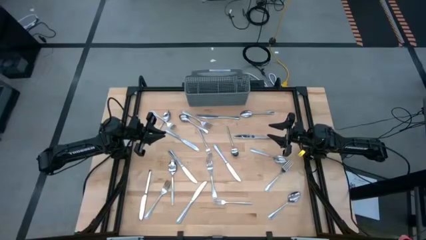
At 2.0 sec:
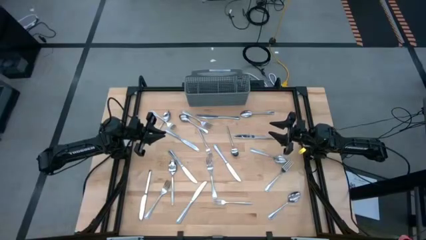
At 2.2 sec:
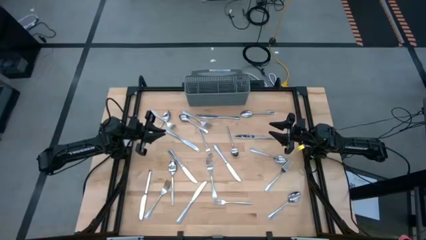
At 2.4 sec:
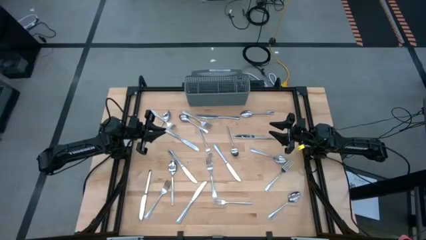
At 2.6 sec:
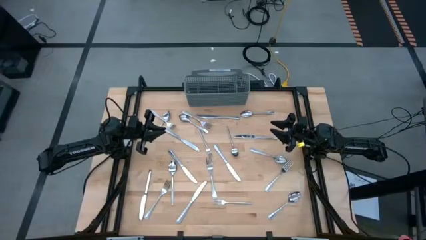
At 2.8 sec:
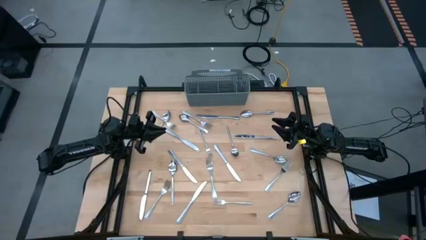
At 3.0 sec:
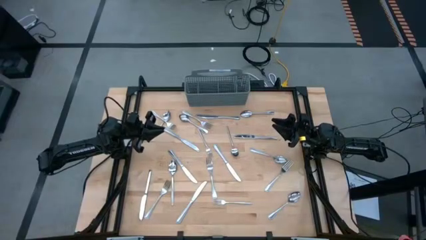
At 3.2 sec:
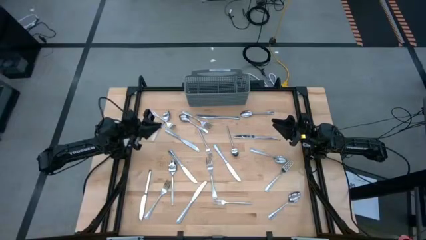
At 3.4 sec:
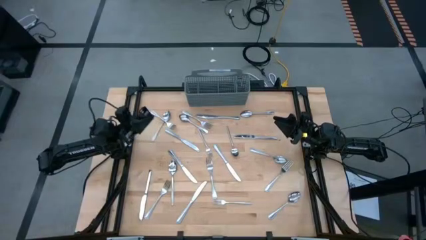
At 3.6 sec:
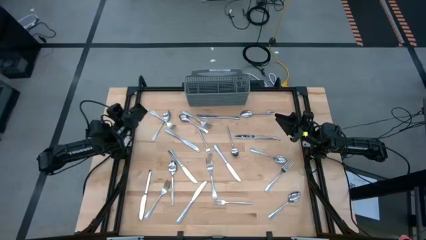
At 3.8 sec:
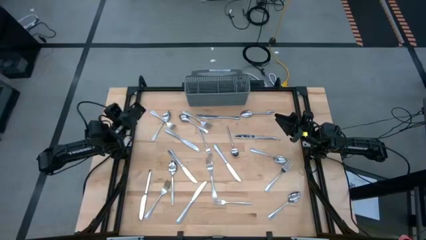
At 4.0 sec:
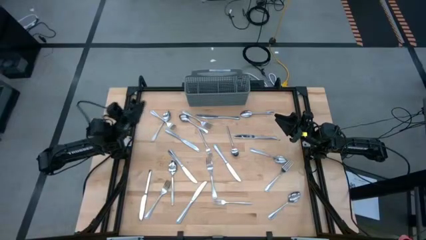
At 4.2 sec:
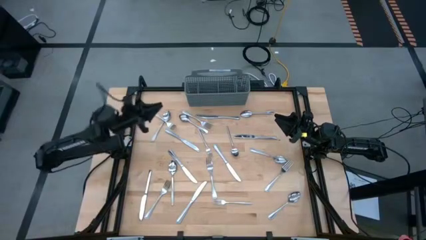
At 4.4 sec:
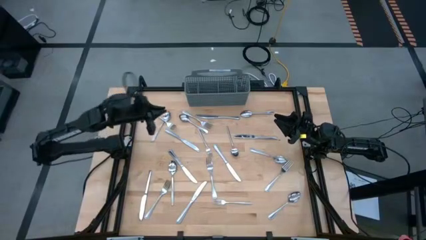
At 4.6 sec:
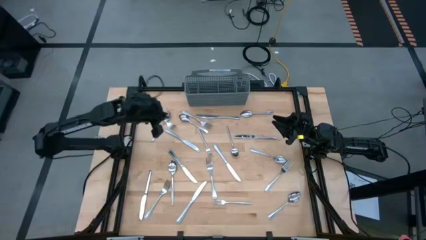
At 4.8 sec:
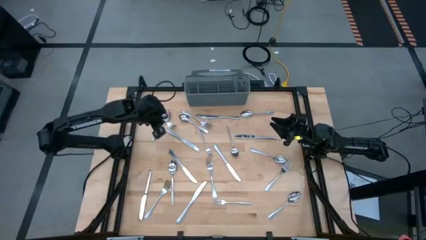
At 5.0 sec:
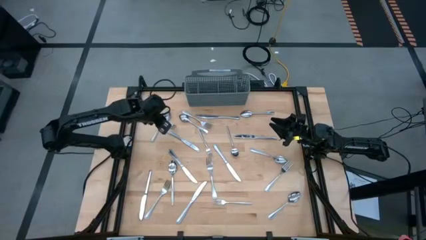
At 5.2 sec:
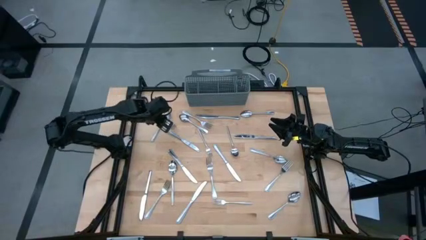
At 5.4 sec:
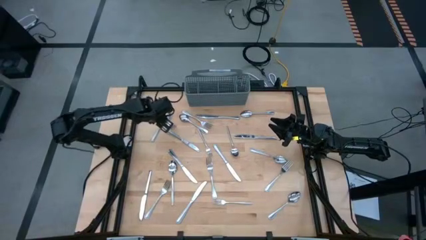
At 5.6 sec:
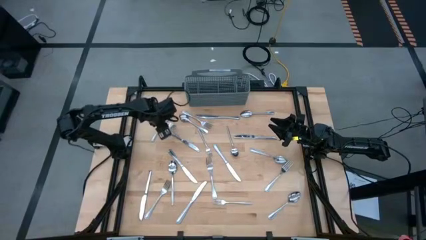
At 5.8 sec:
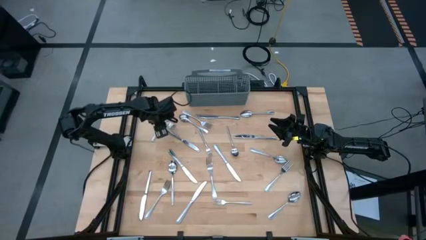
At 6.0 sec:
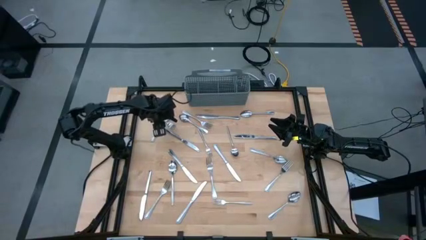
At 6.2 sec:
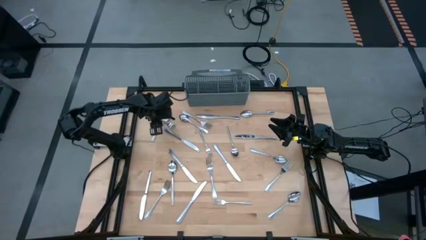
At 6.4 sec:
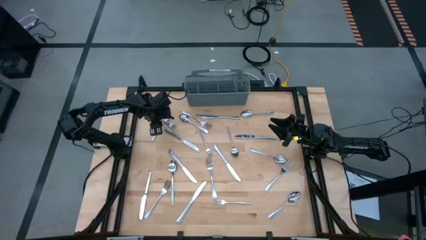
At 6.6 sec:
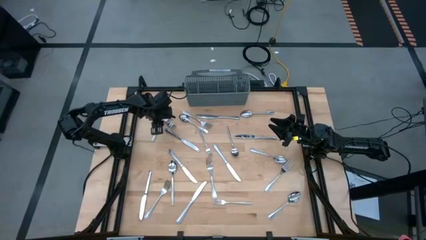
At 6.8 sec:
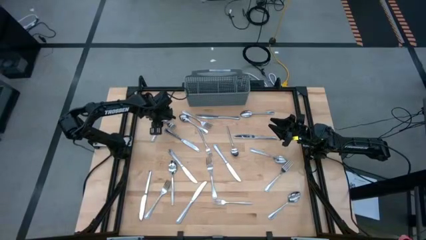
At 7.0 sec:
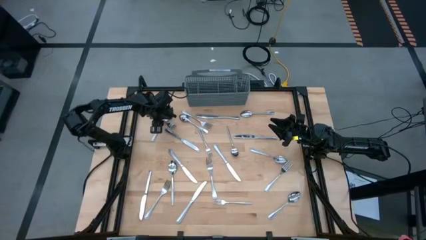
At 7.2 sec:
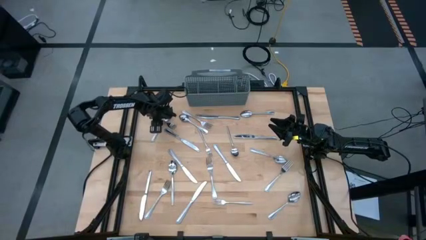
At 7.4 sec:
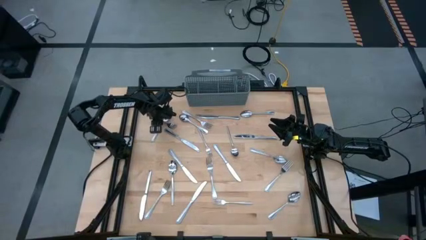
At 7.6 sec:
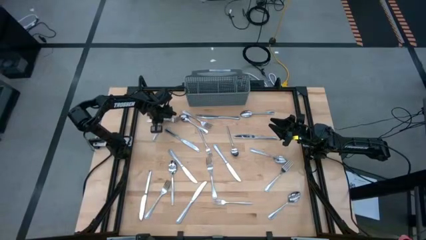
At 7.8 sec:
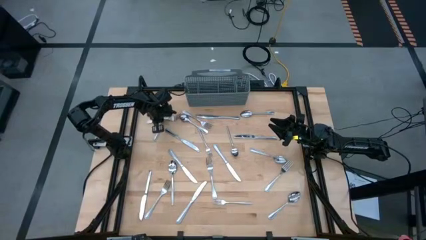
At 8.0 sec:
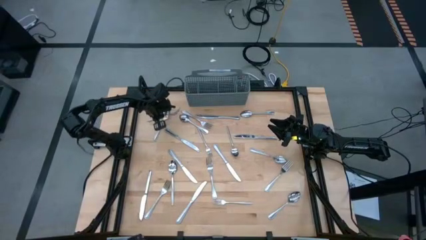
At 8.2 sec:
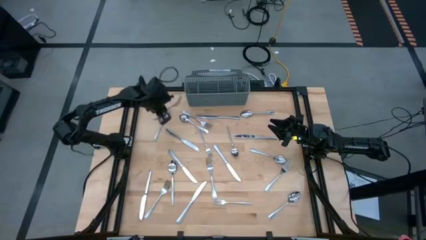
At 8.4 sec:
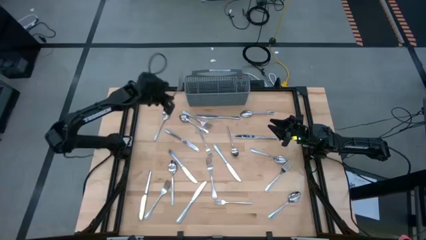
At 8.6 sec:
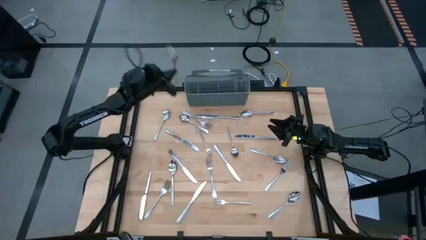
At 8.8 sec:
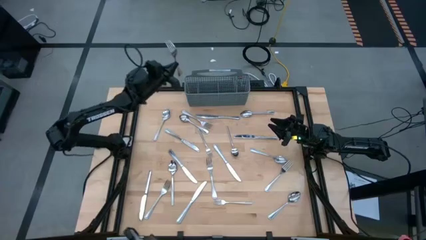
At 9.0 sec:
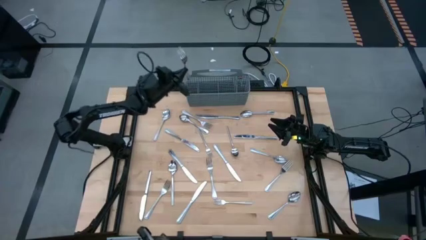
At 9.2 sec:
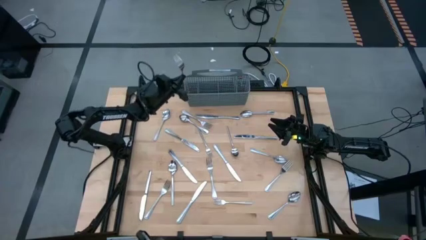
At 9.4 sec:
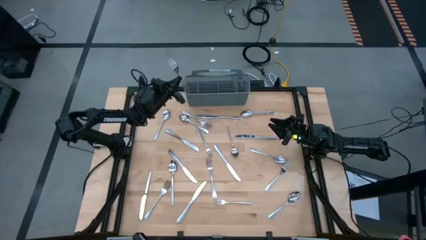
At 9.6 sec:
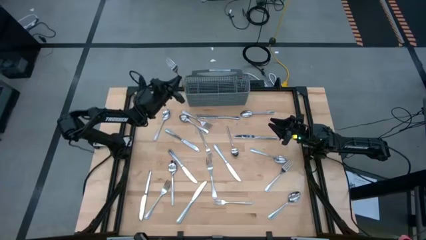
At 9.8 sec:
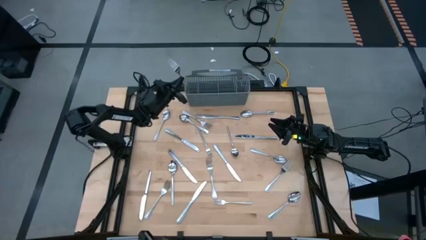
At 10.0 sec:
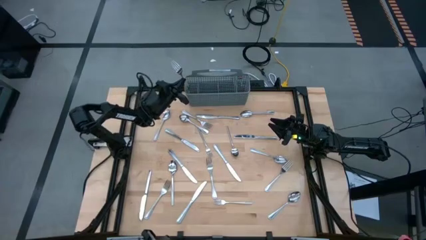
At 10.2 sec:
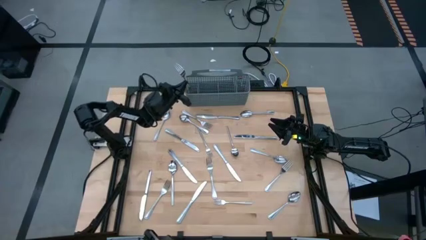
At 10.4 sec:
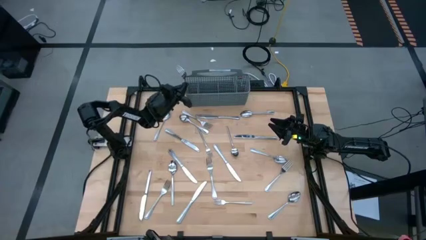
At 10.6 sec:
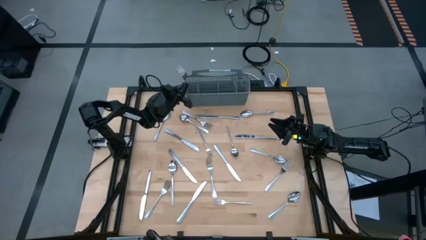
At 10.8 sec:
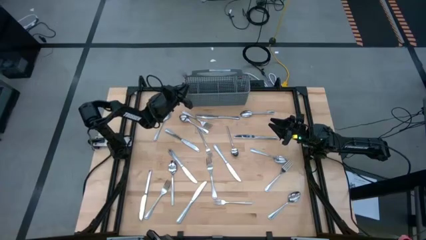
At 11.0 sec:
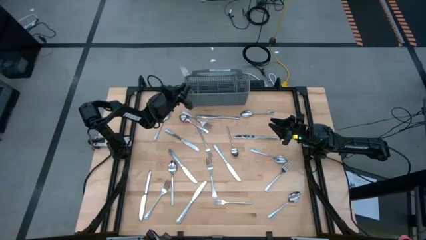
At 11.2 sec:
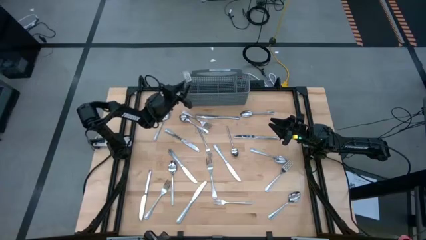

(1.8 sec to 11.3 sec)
Task: Sort silverware
Put the silver fork into the silverware organizer

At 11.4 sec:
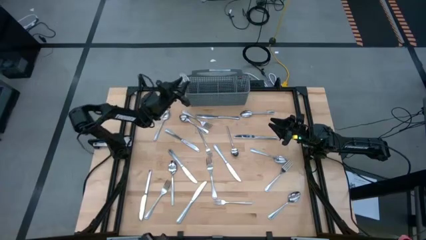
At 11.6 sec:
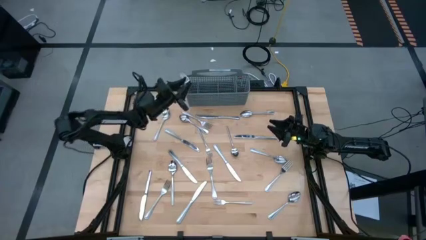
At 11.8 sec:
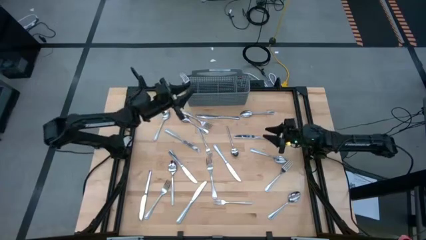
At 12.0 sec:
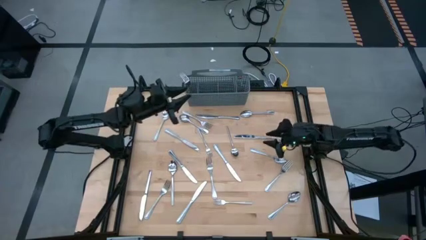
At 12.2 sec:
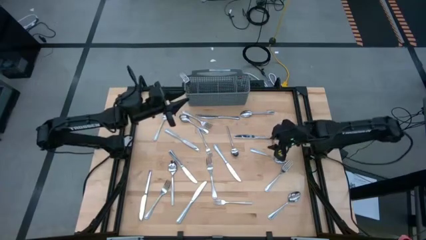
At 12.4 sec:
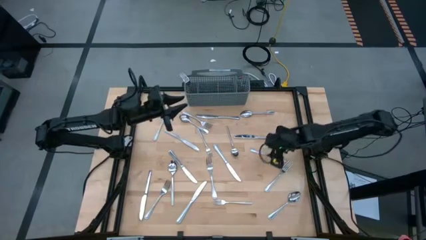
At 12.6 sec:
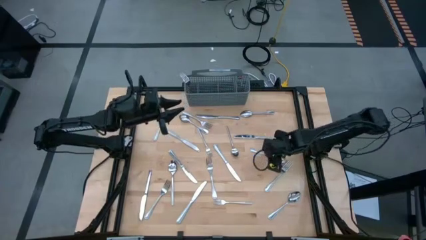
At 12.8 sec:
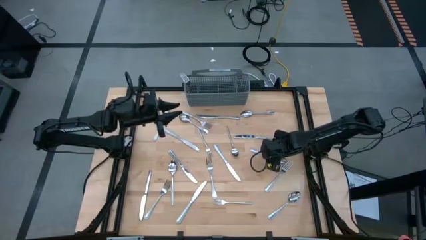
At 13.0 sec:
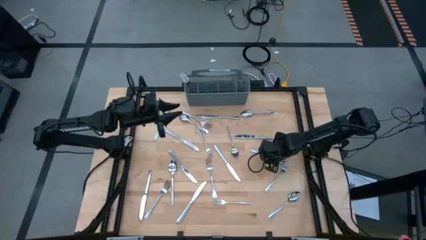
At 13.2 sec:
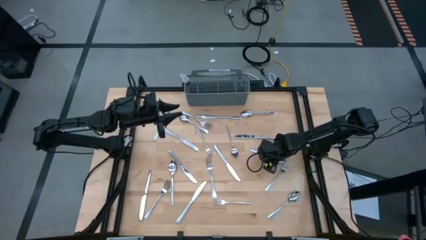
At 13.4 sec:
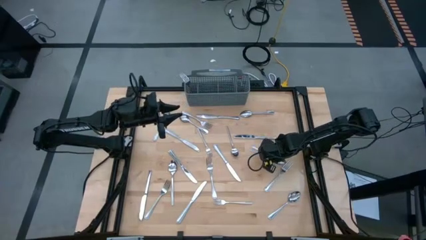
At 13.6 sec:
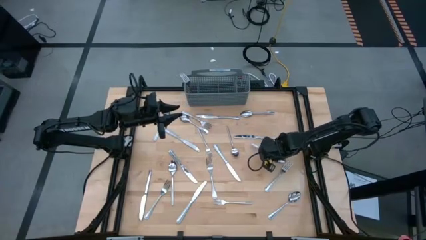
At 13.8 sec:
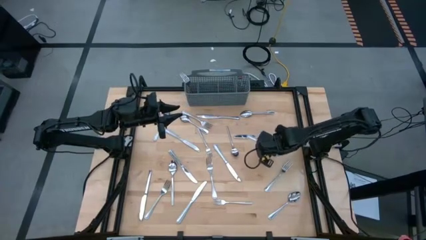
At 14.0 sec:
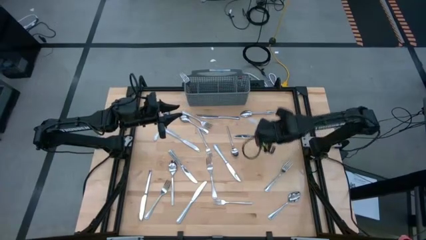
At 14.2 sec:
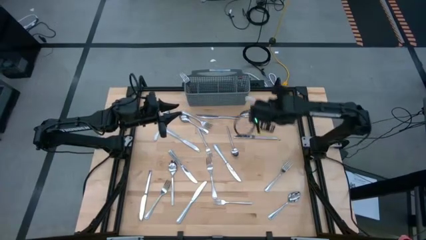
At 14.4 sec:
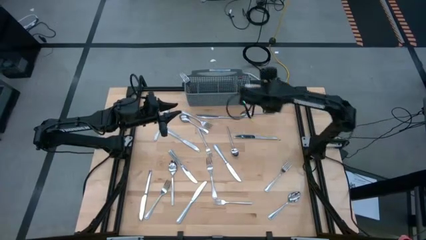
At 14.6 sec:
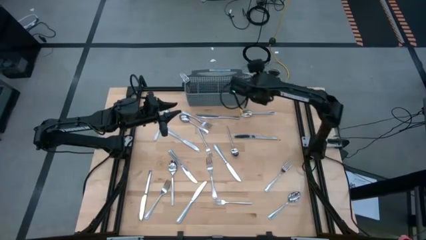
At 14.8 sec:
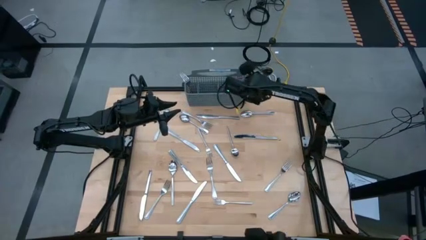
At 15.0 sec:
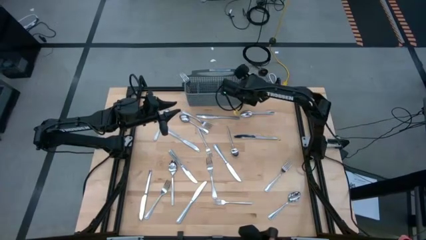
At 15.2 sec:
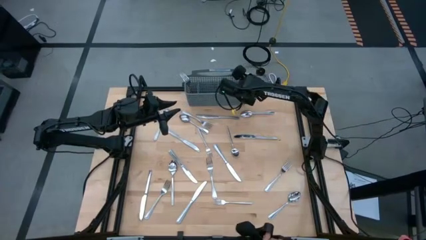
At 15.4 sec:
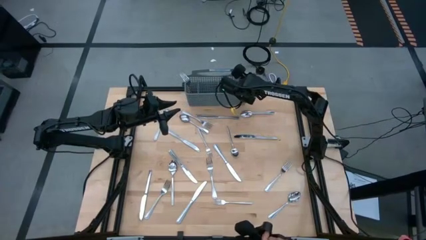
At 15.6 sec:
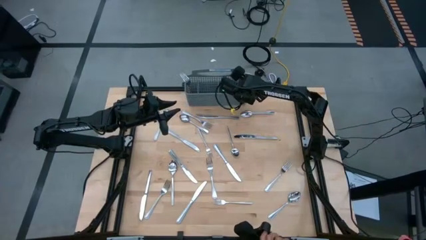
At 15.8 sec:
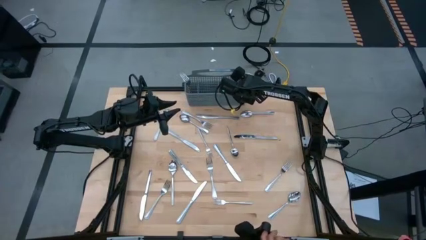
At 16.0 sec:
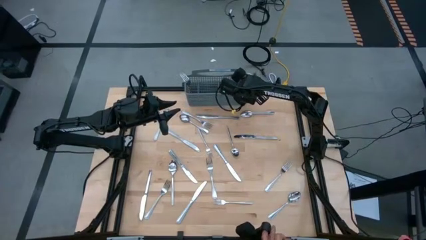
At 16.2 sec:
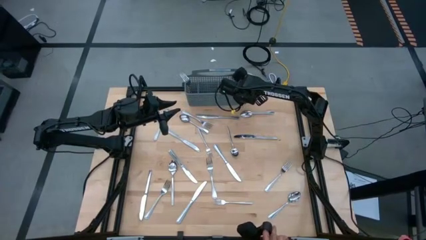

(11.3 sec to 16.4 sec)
Put the silver spoon into the silverware organizer

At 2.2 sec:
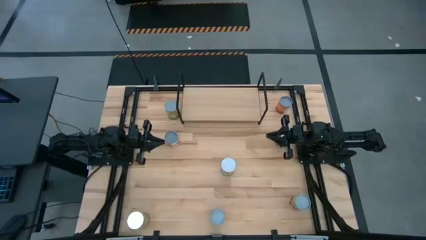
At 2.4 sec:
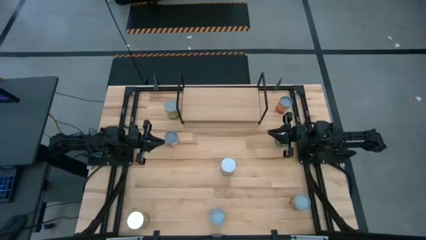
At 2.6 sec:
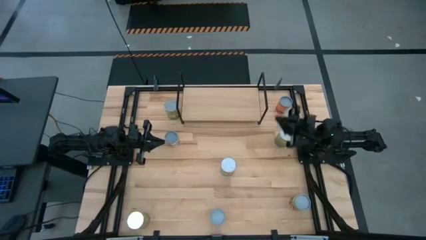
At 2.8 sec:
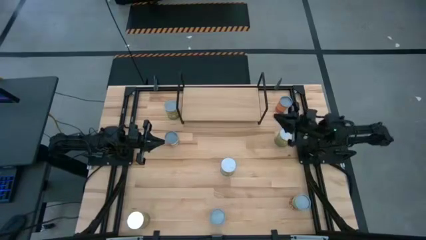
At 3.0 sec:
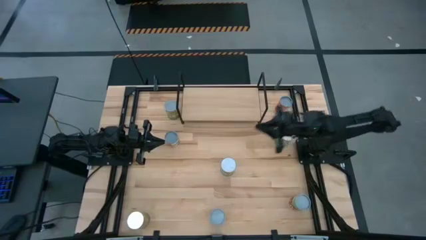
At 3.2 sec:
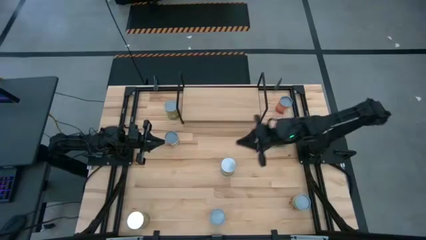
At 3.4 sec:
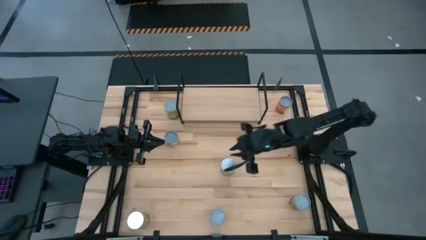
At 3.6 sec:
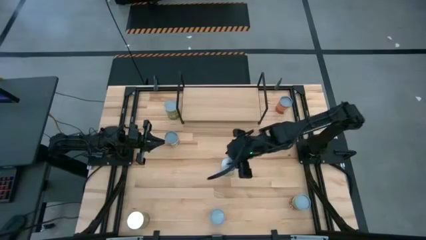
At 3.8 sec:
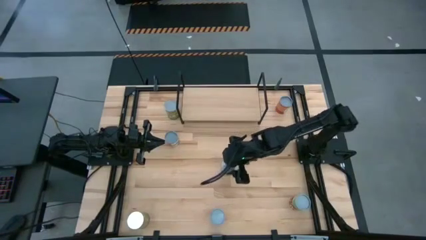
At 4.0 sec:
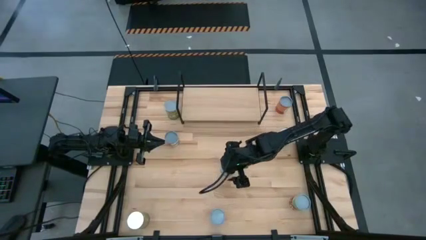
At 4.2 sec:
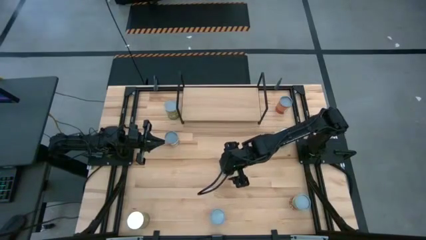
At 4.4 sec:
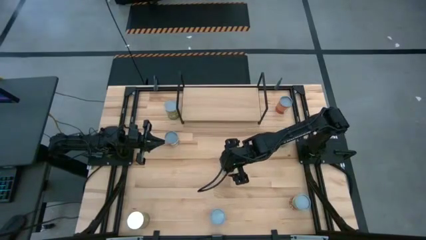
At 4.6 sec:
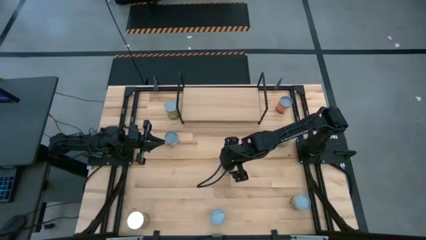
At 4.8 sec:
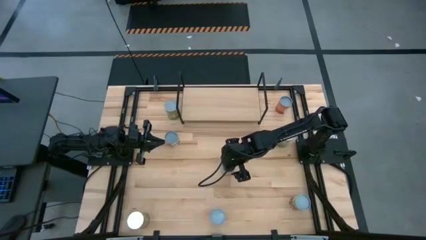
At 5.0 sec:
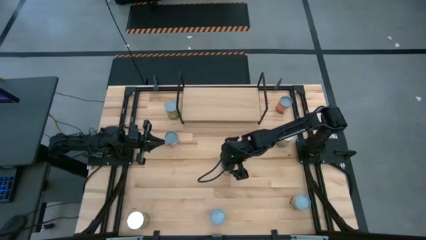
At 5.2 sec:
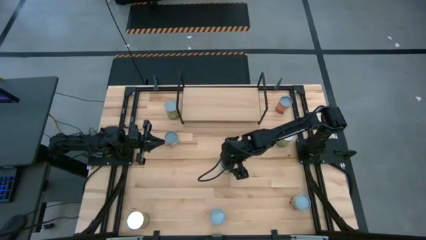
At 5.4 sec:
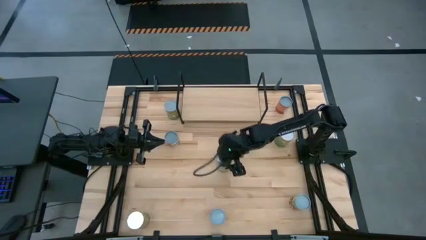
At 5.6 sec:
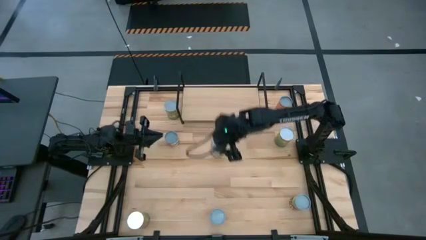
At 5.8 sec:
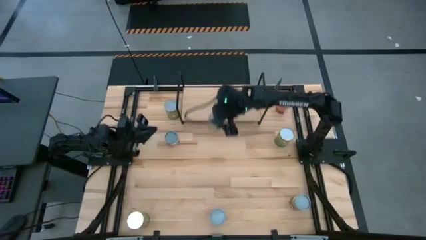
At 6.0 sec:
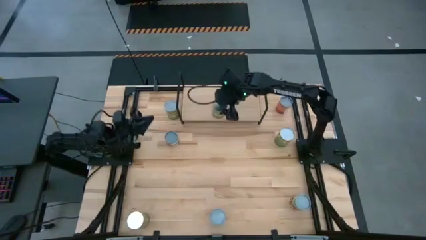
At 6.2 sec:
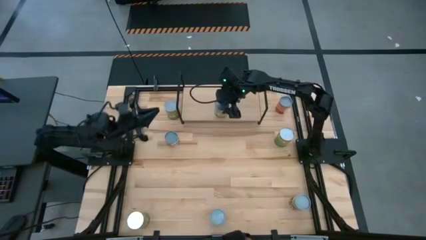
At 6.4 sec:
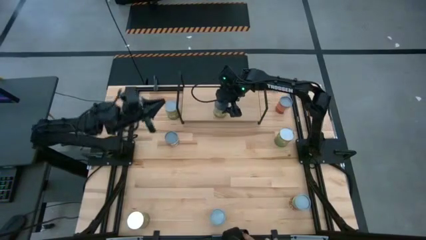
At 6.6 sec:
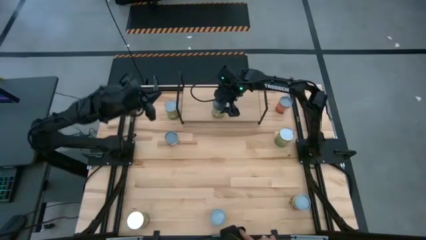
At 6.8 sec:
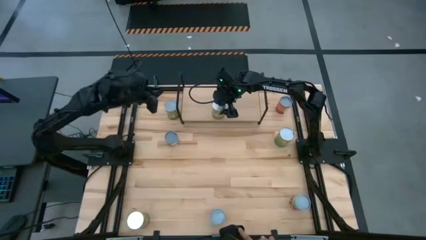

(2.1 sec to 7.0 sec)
Task: Pick and place cans onto a shelf
Put the bottom canned pears on the shelf
